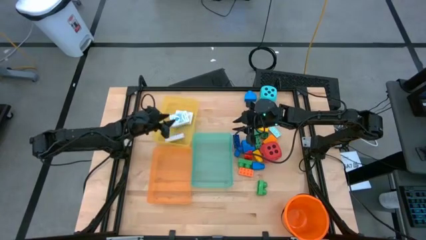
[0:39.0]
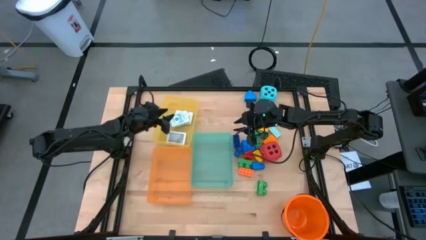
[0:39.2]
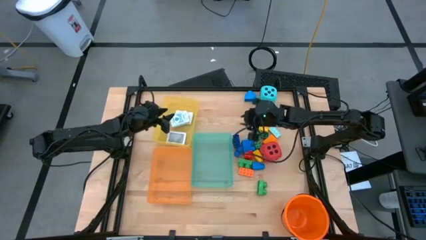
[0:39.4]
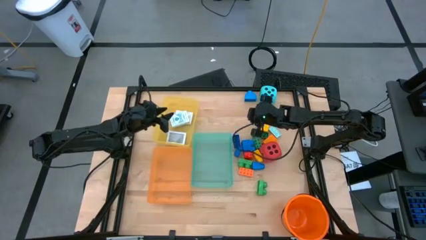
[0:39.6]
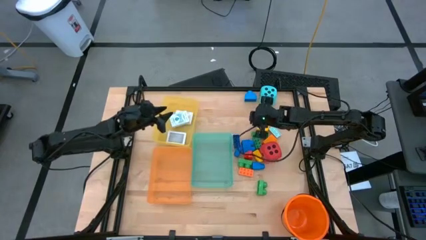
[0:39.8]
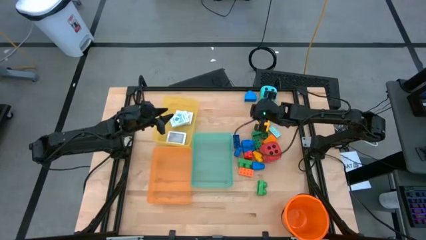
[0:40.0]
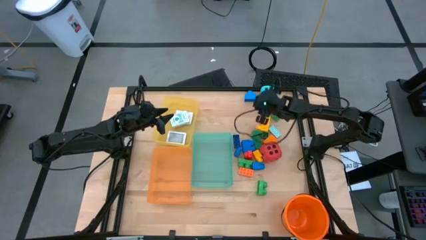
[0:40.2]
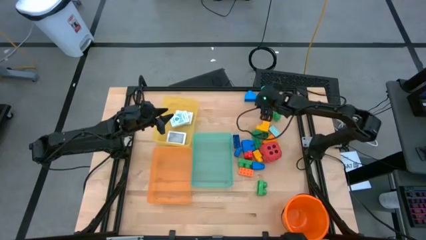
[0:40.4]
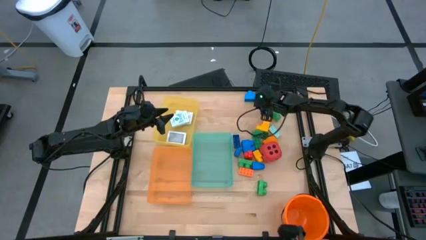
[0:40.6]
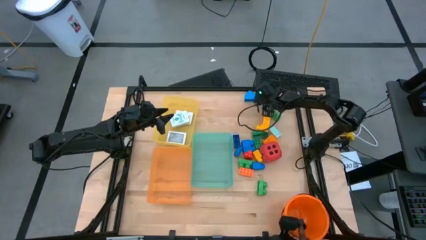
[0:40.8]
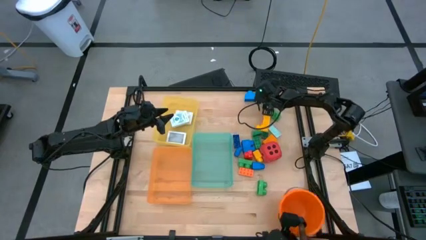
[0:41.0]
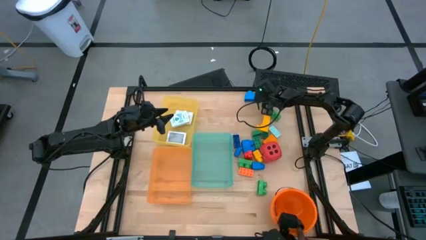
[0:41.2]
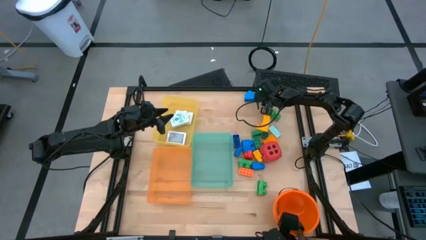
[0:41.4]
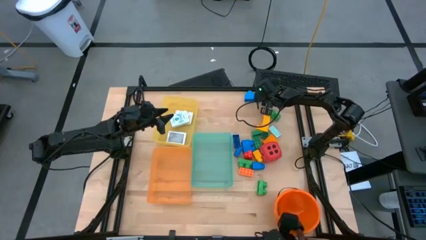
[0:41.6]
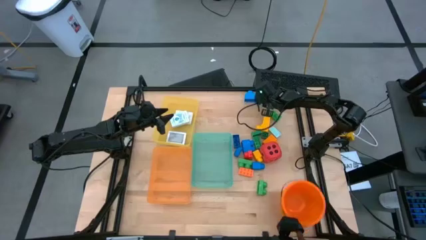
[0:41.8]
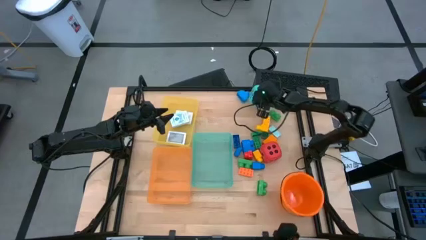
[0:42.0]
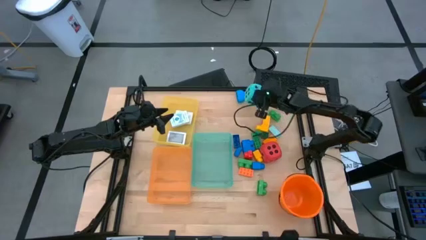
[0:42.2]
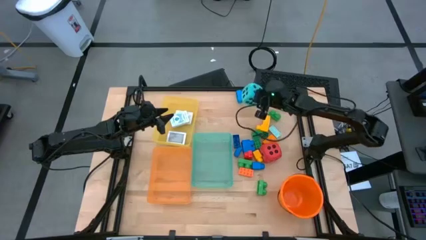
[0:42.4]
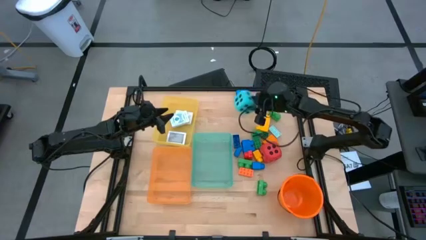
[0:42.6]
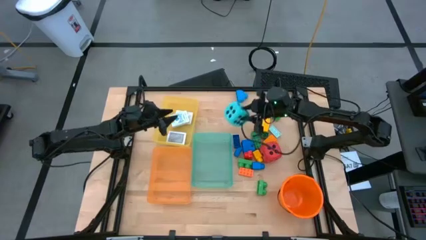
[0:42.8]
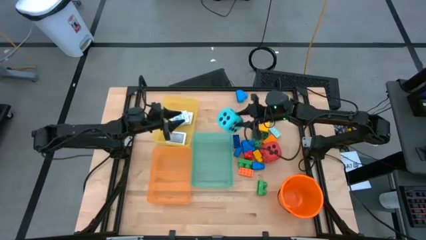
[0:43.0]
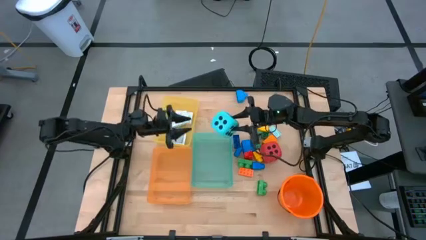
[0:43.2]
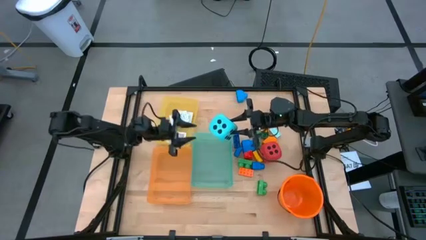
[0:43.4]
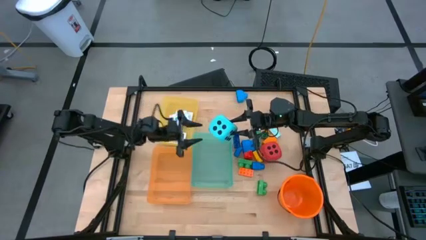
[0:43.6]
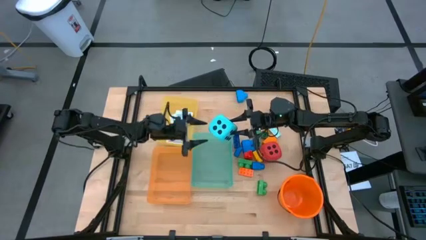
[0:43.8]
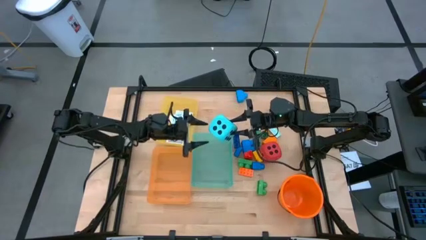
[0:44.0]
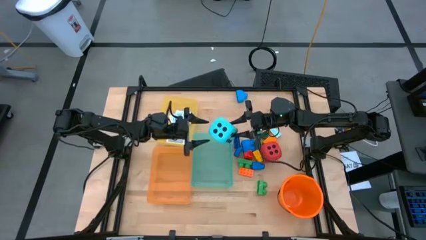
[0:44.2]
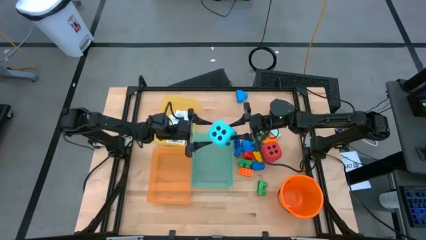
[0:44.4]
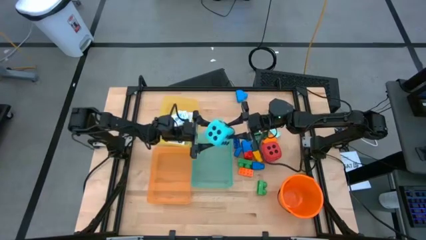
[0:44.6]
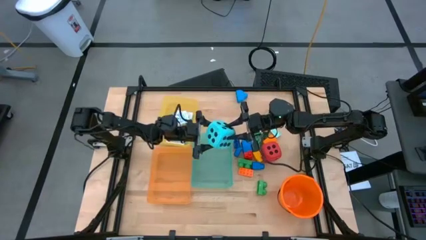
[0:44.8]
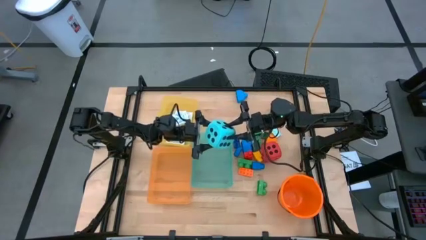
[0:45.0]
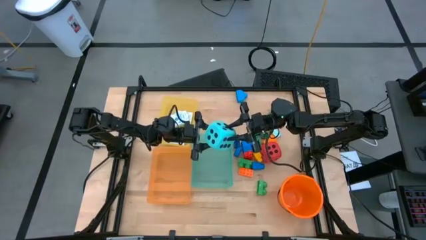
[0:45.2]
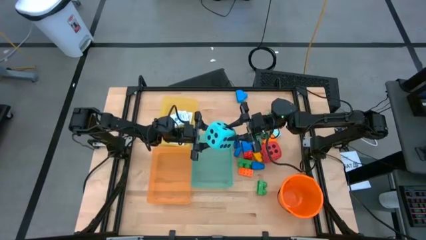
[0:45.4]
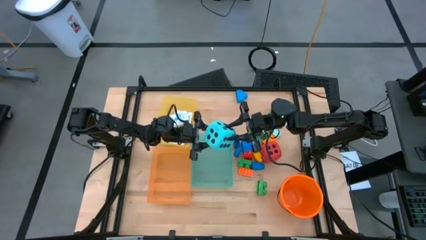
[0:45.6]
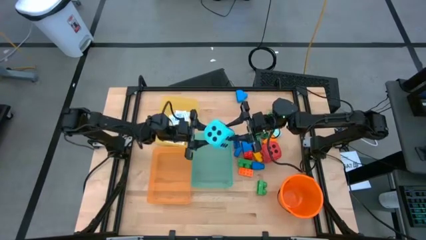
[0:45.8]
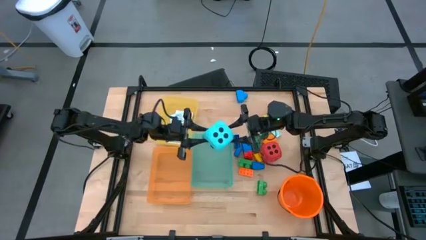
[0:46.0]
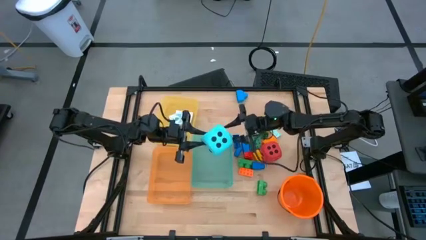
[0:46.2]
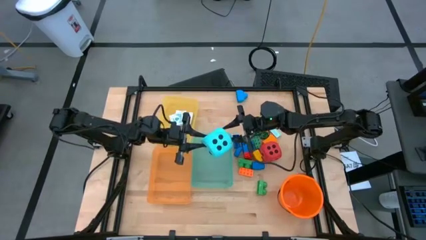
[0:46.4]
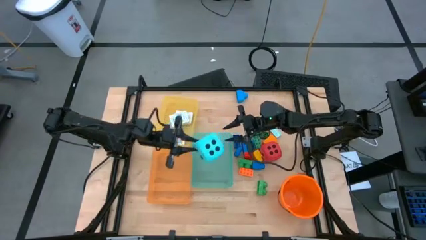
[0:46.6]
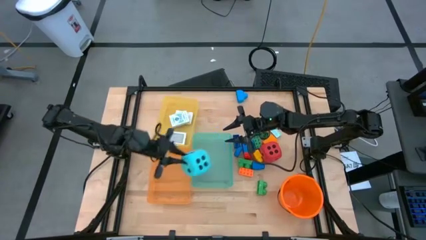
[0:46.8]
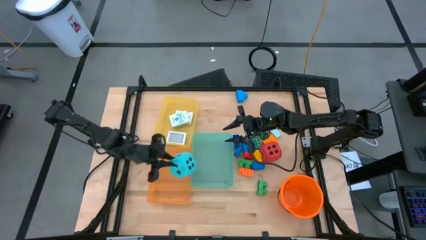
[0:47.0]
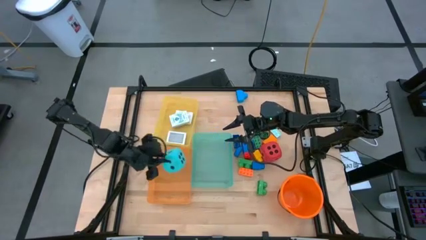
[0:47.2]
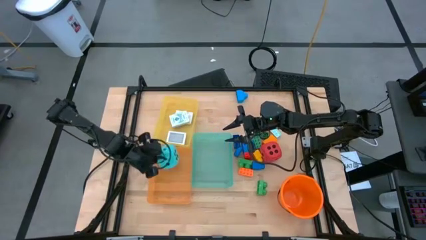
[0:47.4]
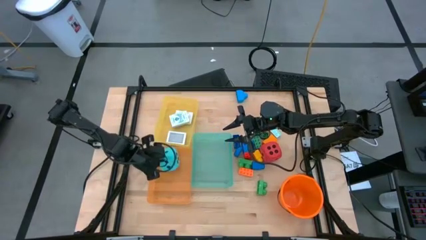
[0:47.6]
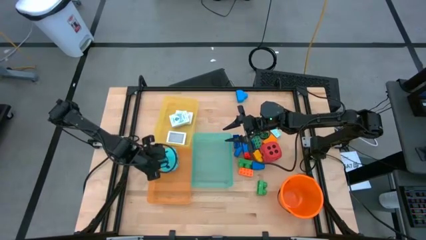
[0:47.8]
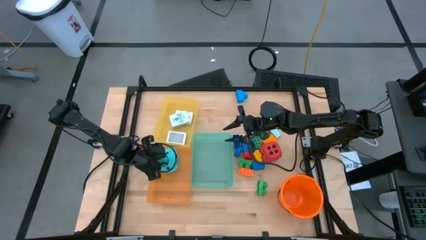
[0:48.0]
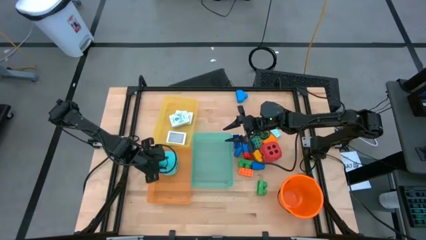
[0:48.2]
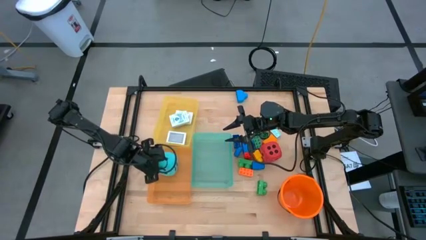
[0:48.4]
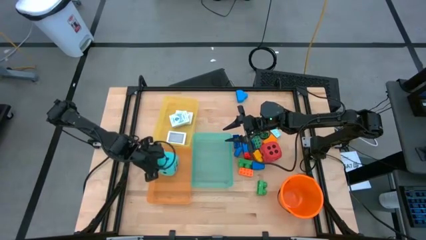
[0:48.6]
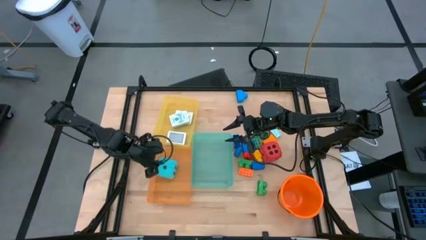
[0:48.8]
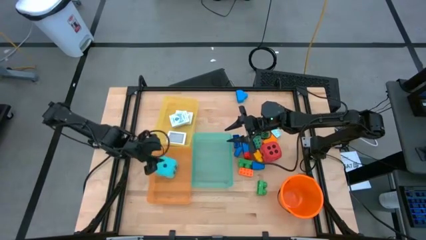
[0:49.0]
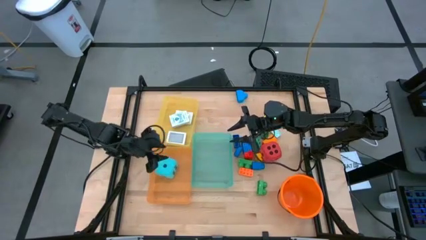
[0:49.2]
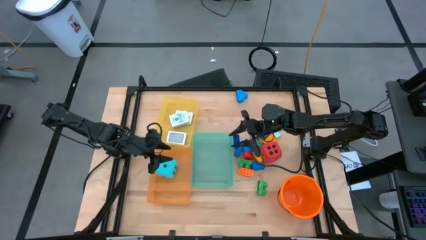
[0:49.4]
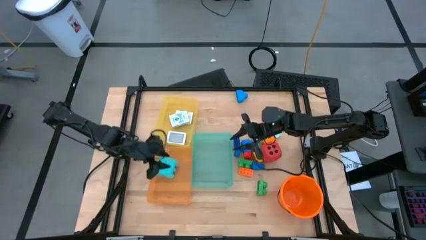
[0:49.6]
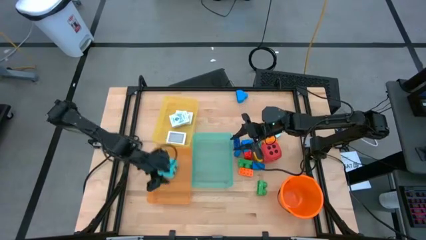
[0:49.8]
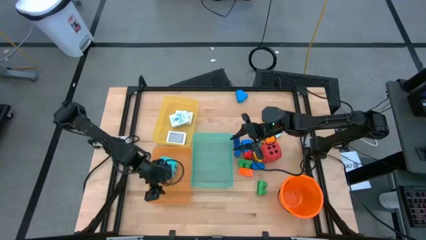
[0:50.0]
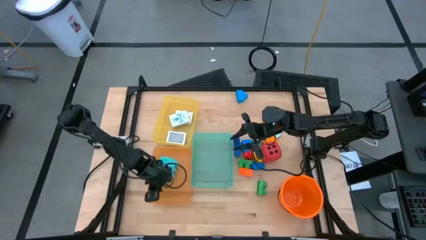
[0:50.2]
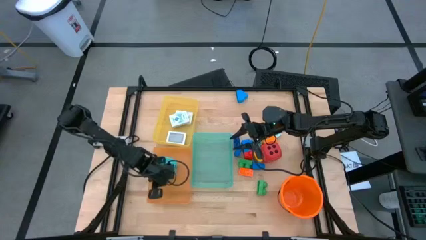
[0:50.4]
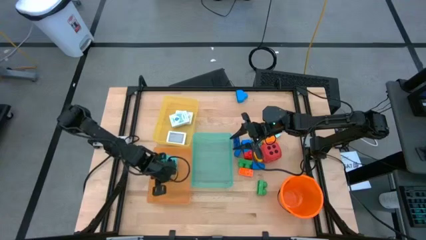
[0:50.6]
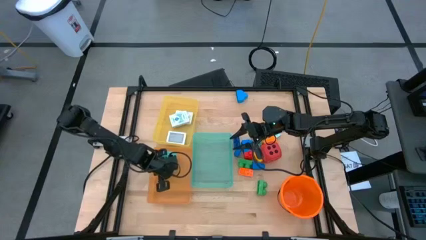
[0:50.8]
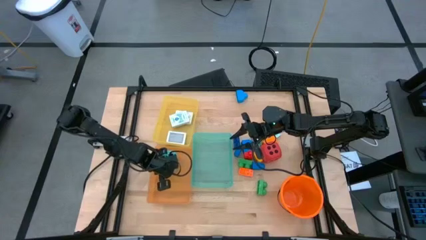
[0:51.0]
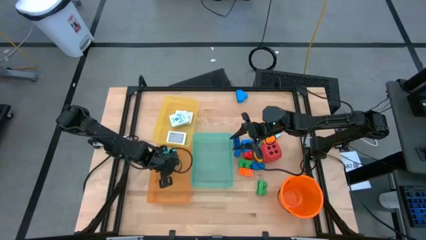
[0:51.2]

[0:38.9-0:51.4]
Task: Pick & Place Toys
Put the blue dice into the orange bin

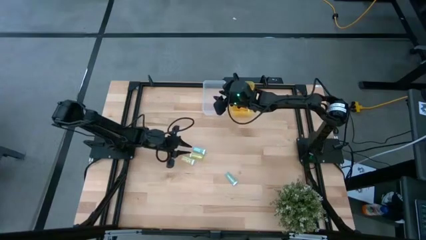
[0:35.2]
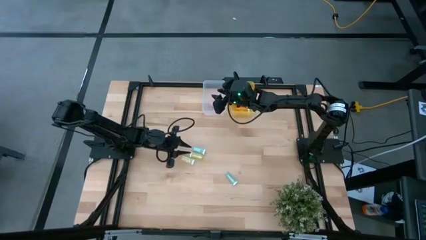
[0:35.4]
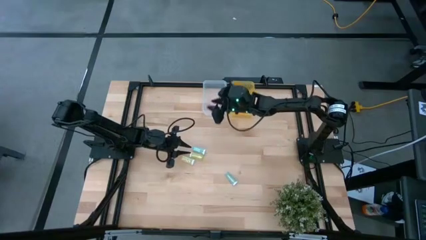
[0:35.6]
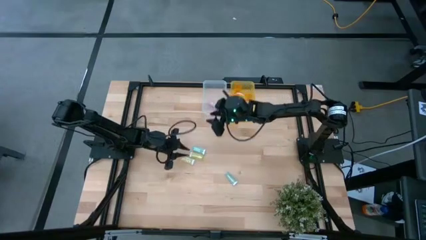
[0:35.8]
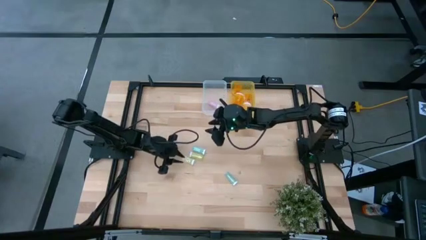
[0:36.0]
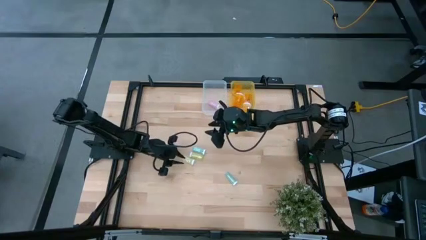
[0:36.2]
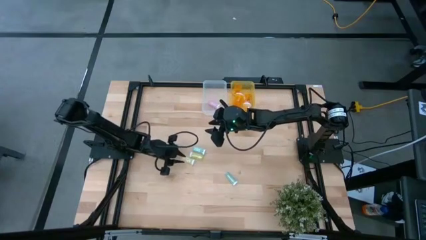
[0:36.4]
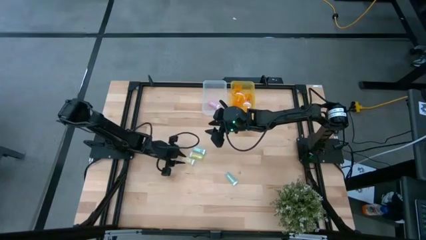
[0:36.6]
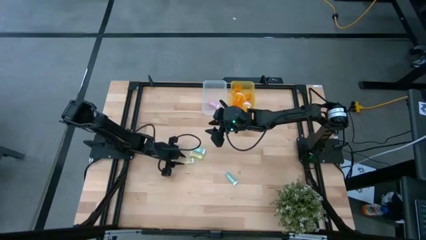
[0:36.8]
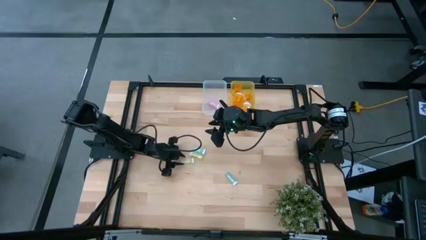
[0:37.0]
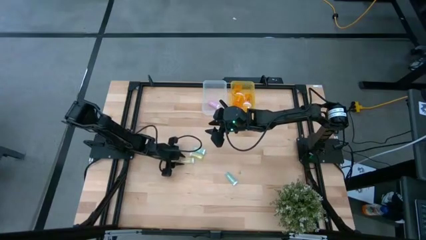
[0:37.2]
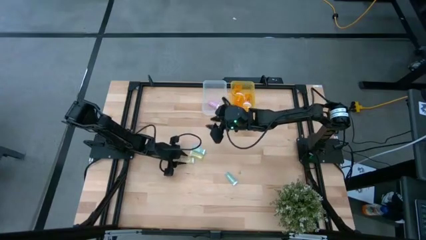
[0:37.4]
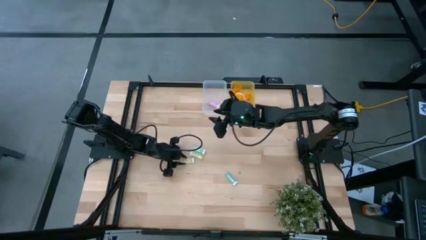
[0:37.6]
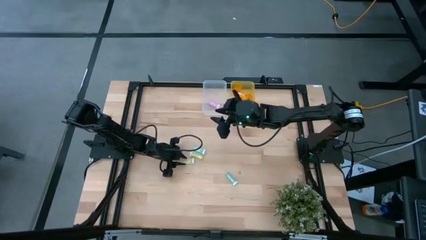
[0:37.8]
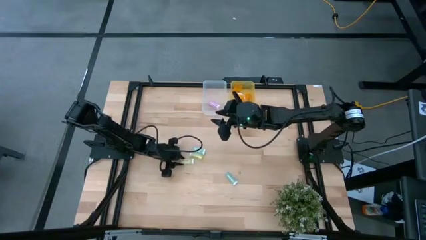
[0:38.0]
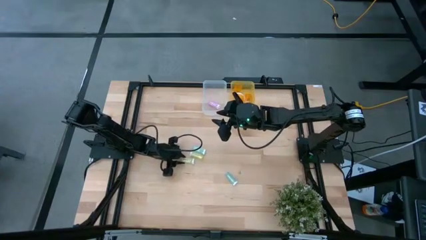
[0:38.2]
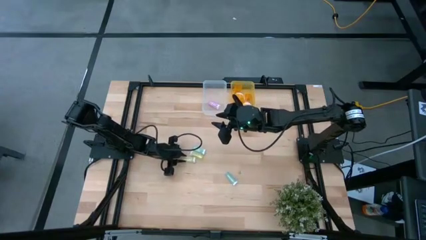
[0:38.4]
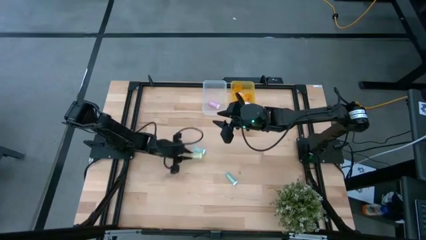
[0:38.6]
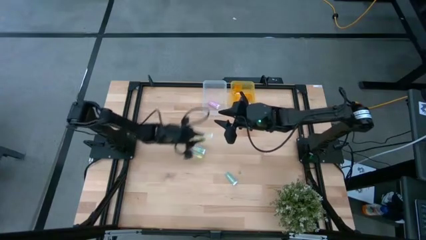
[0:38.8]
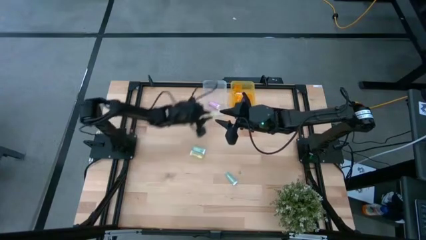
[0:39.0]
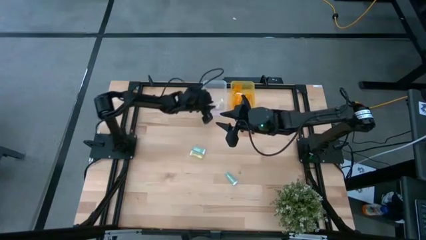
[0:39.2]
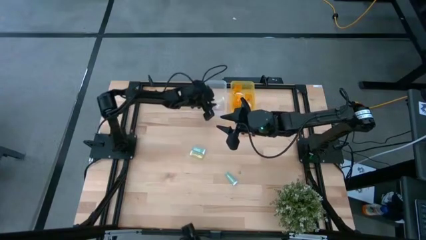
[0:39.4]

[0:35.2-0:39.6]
Task: Pick and place medicine bottles into bin by pill shape (circle, oval)
Put the small yellow pill bottle into the transparent bin
